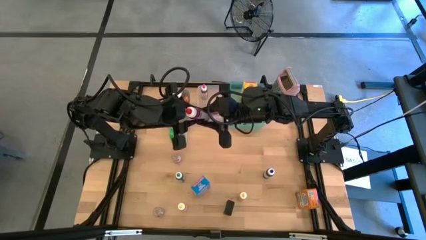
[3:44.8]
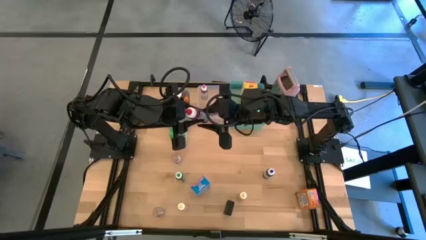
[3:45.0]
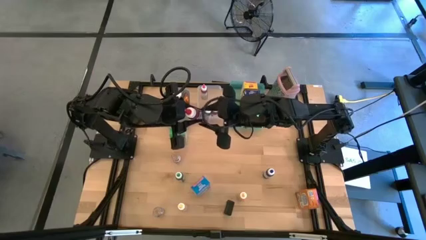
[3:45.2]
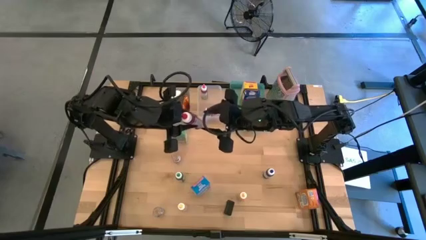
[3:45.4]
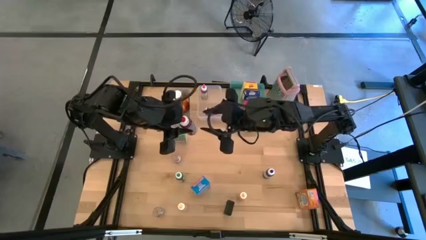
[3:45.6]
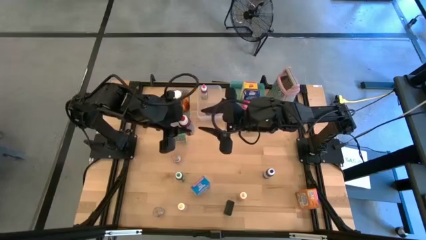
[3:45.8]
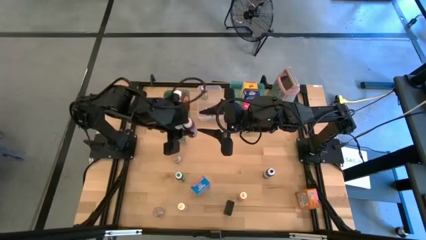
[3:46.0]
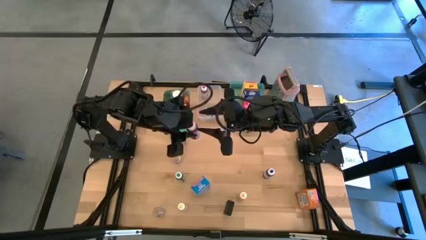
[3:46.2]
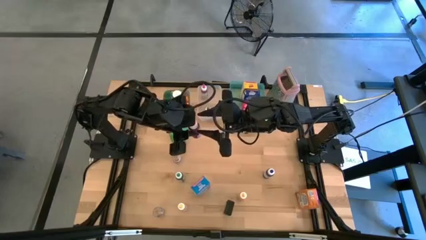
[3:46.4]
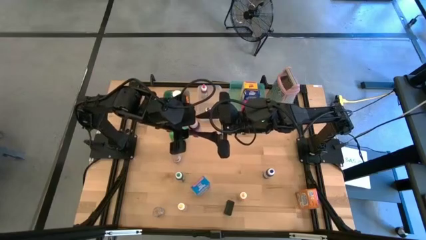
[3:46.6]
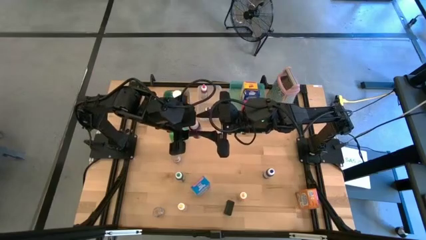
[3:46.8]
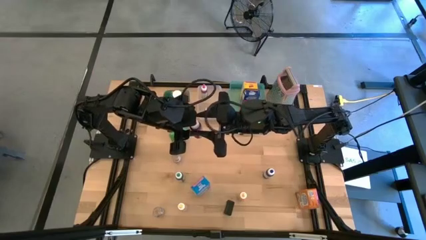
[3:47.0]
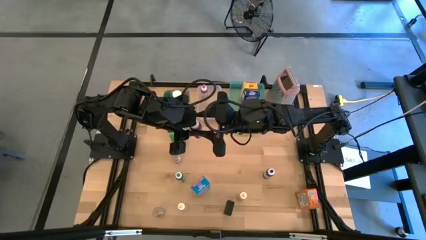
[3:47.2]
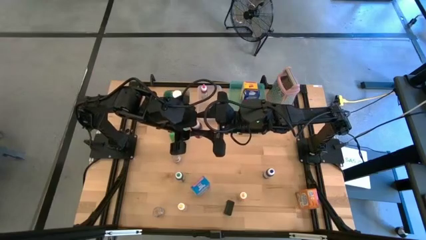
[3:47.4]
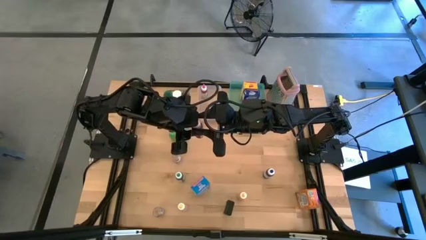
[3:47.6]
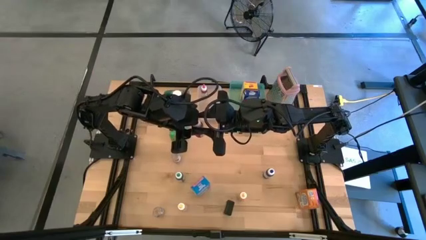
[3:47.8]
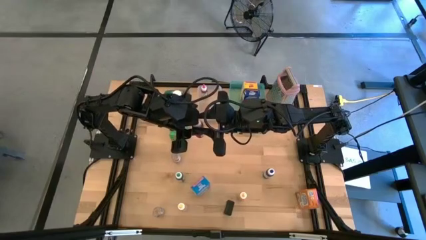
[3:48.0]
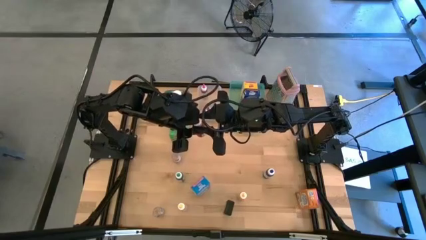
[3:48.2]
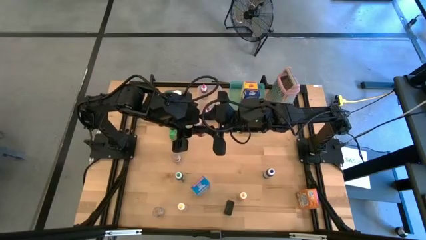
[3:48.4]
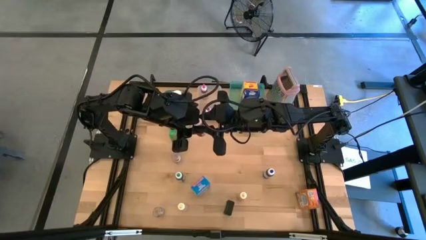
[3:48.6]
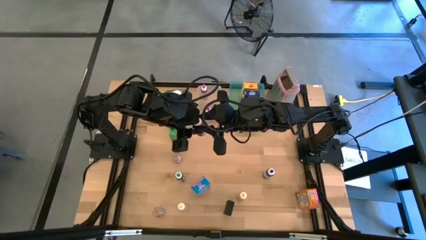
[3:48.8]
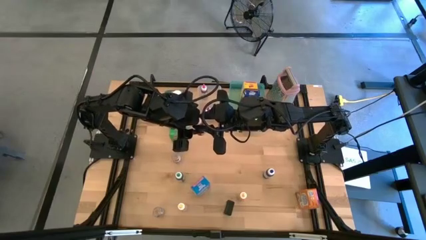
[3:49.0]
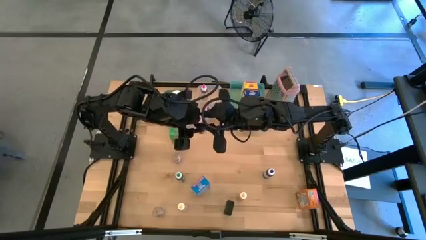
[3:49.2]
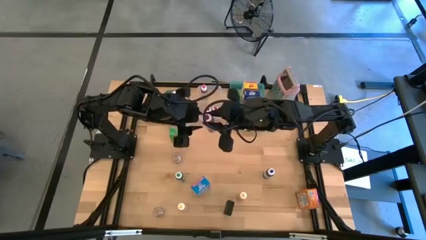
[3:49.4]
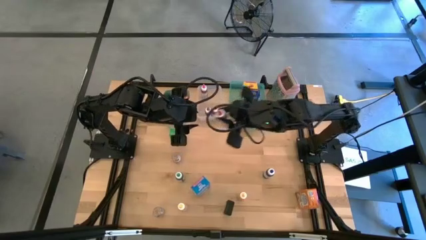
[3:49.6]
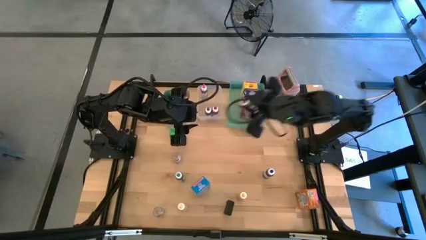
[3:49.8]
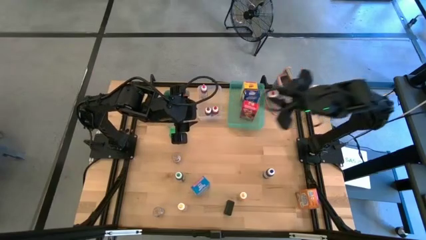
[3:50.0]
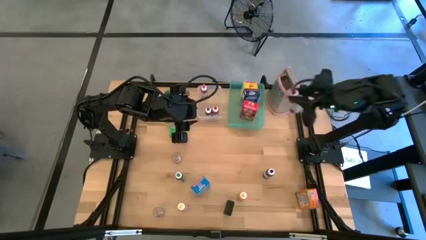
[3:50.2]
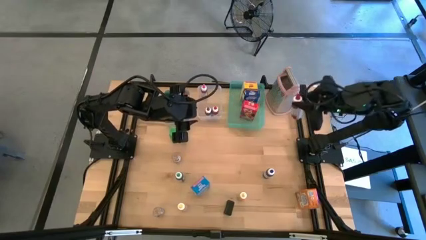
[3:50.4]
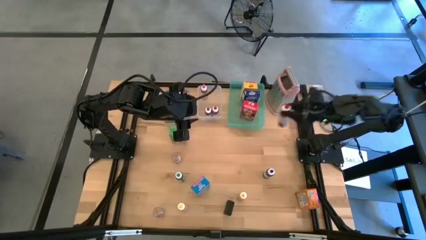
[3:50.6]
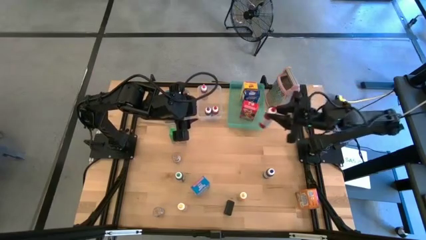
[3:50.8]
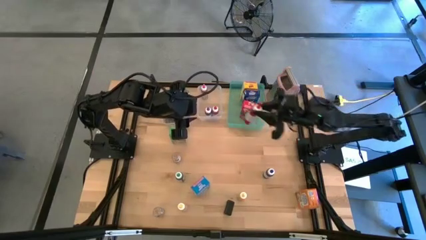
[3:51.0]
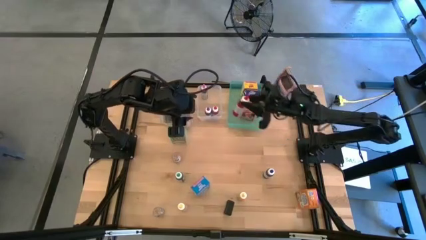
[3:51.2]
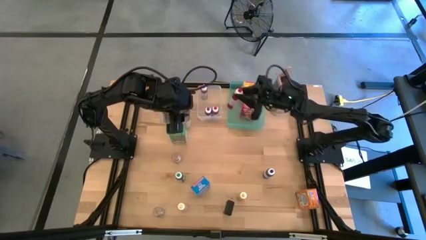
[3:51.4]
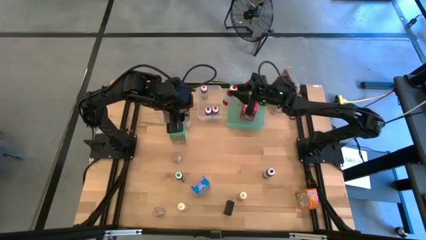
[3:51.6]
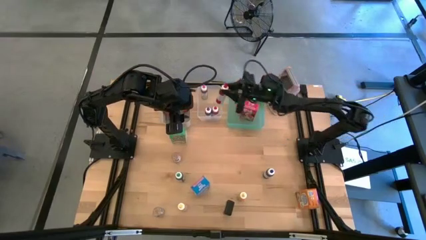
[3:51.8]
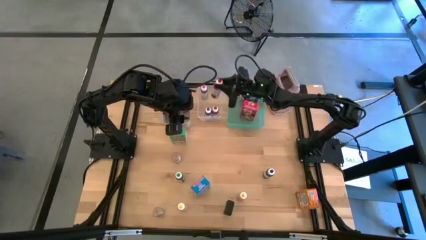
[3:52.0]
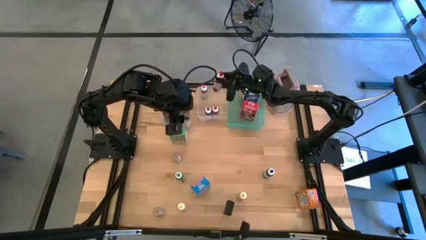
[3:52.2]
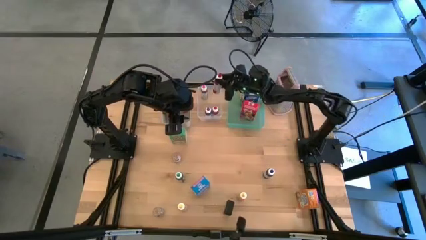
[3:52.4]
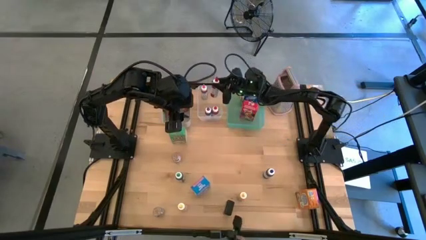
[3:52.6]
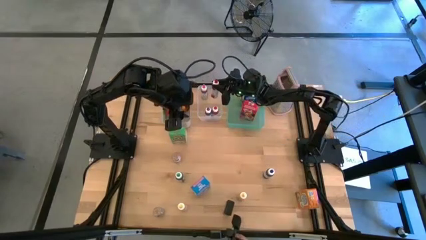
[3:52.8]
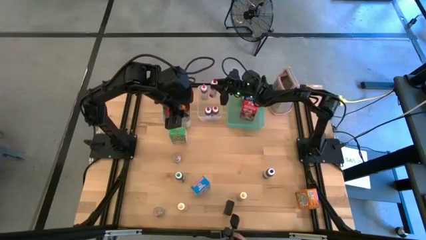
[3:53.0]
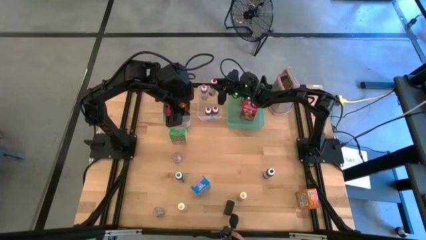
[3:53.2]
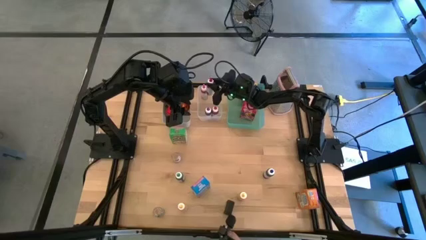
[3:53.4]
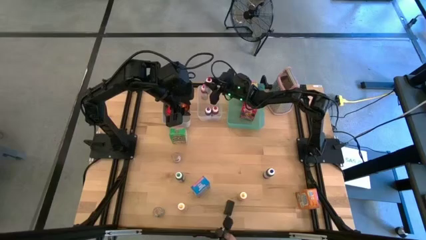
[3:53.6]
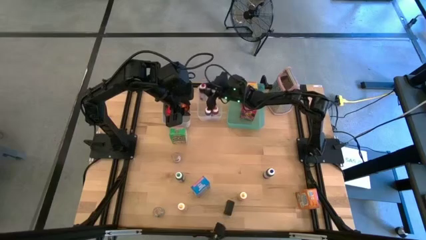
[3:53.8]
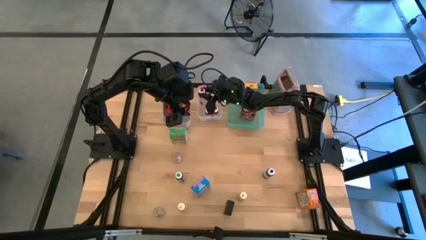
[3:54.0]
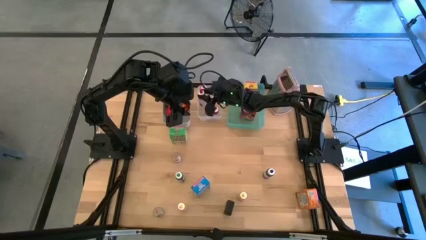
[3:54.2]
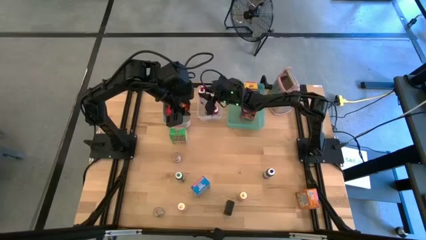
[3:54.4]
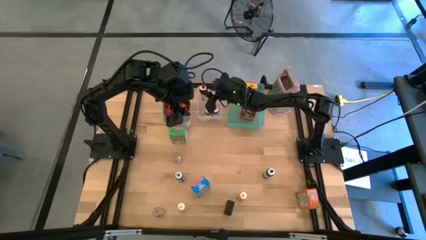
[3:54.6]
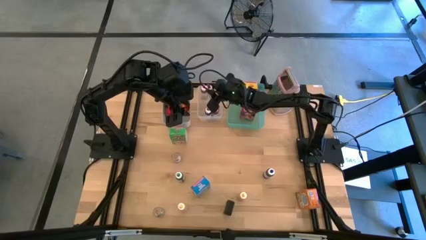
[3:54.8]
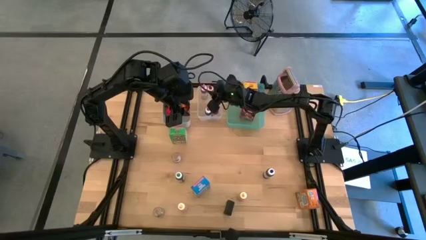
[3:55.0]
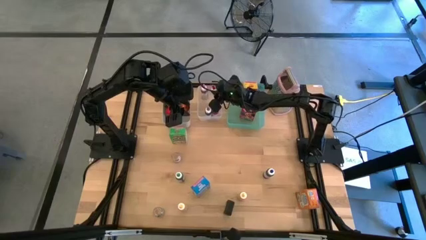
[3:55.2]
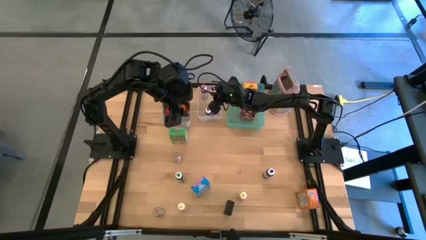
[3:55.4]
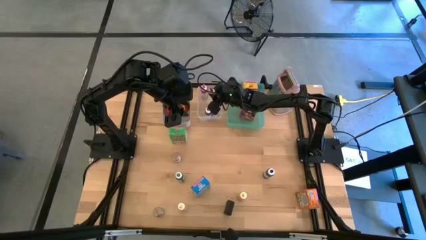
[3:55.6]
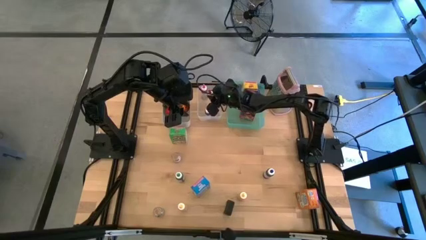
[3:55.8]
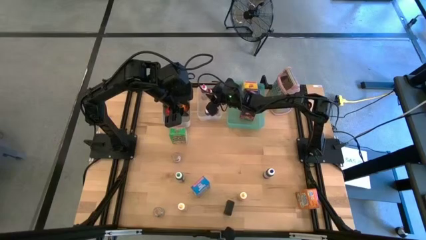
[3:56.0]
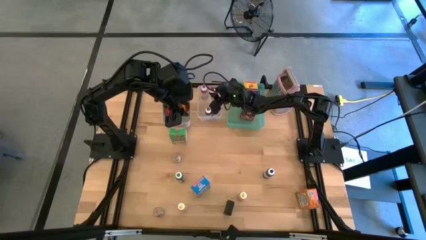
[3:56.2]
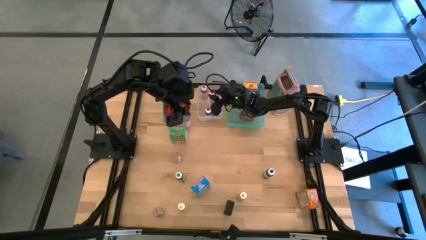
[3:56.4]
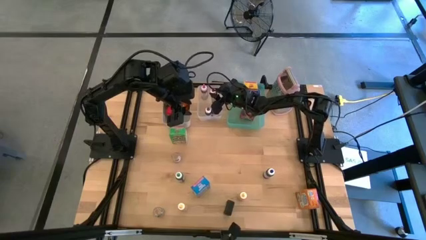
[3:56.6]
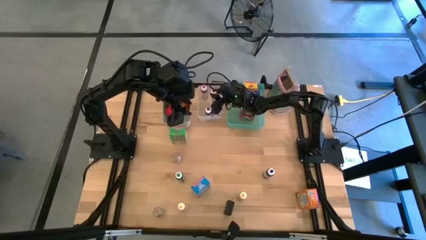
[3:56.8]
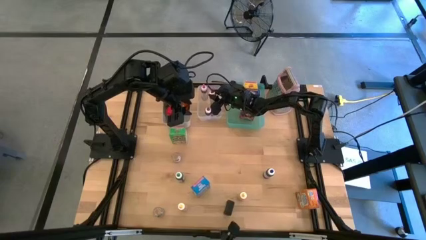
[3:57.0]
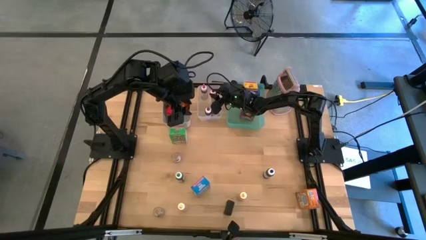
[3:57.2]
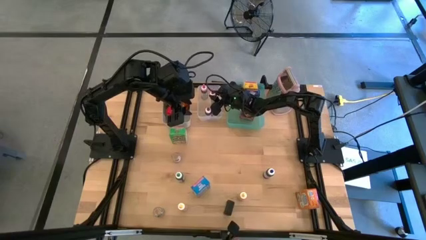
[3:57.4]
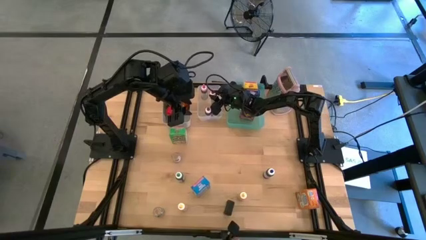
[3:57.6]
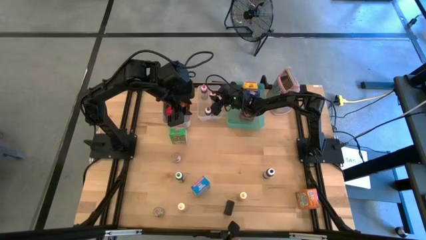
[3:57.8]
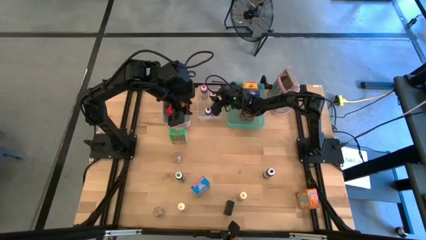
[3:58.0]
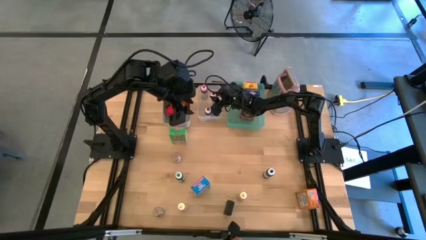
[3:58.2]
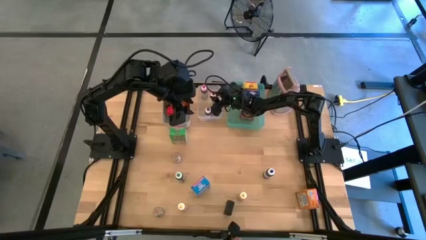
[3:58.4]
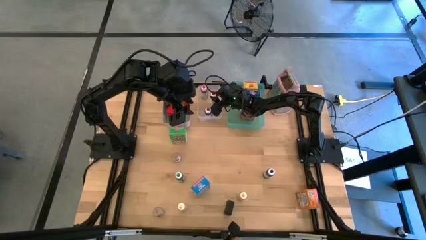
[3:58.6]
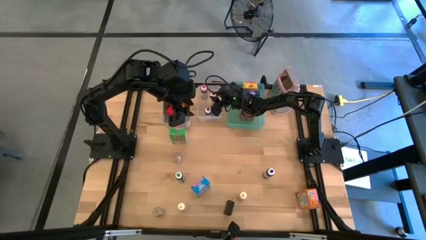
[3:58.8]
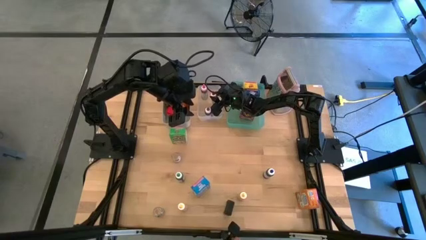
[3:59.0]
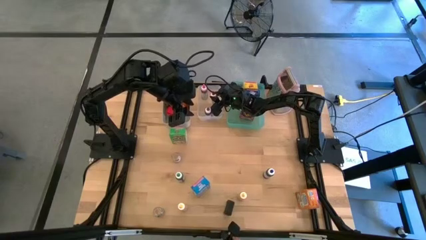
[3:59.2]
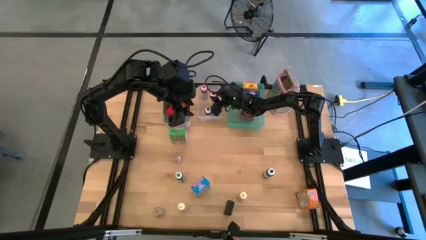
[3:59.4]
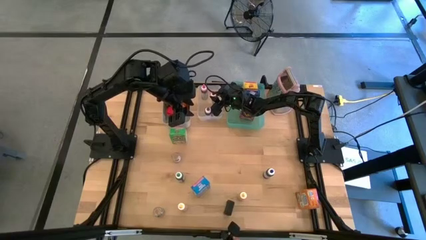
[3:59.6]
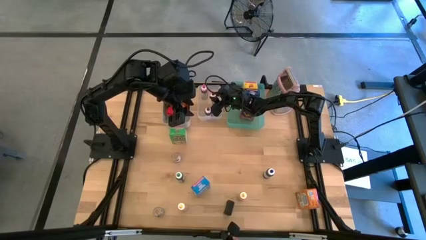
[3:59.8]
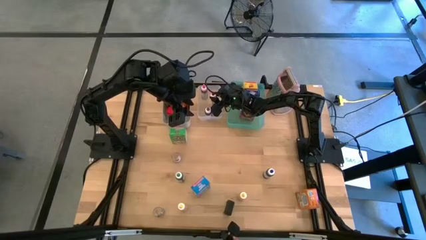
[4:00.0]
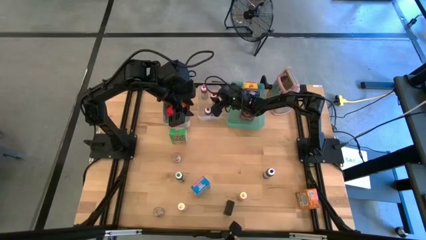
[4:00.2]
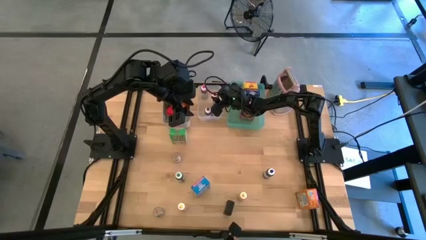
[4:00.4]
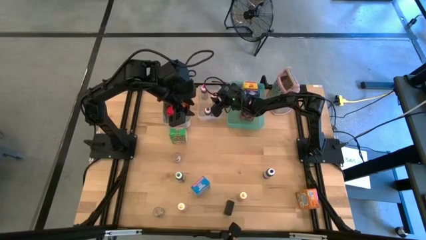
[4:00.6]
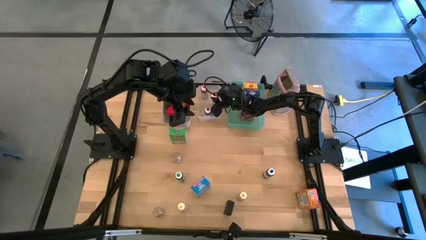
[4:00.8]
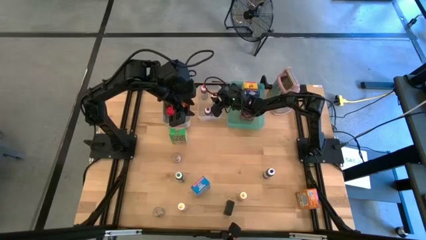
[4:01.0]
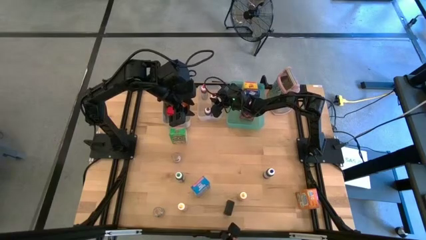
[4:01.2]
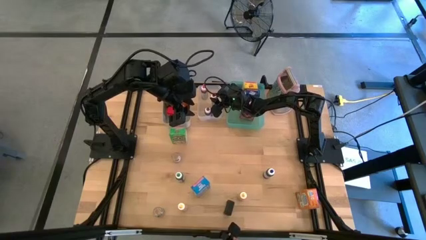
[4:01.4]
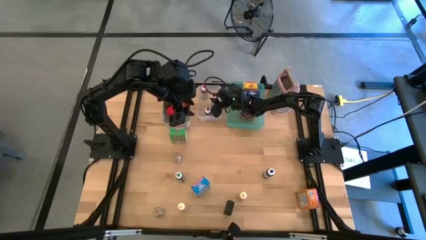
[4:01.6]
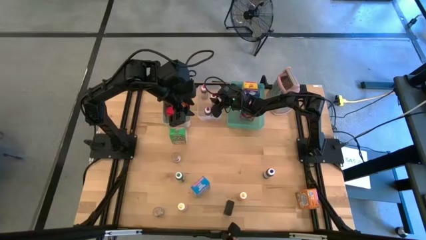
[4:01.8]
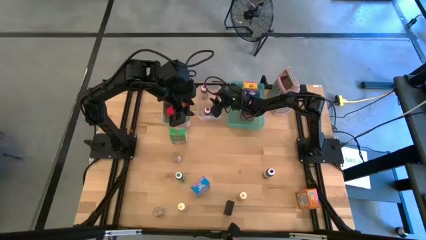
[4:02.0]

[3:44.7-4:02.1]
Task: Pick & Place Kitchen Items
Put the red food coloring bottle into the transparent bin
